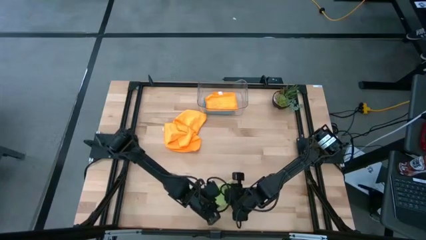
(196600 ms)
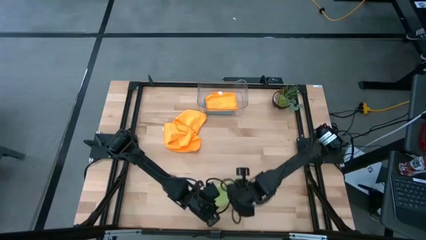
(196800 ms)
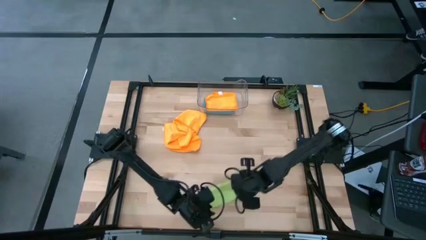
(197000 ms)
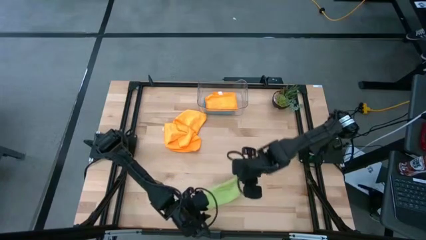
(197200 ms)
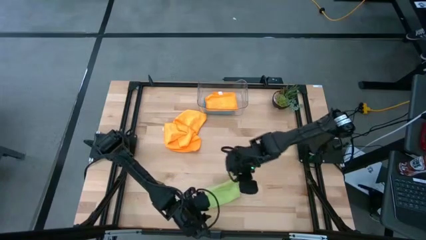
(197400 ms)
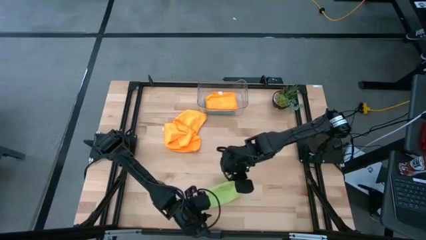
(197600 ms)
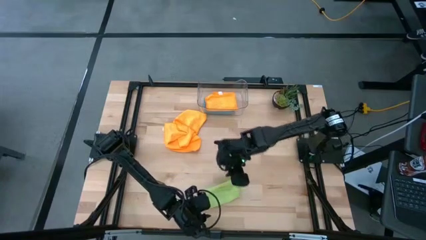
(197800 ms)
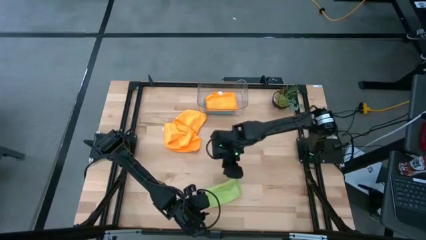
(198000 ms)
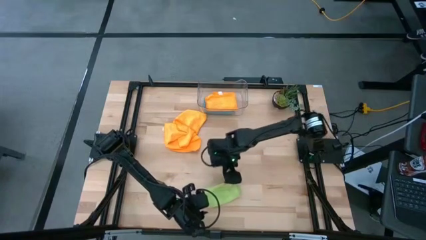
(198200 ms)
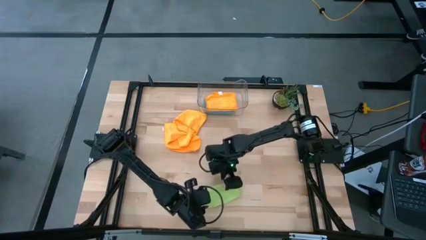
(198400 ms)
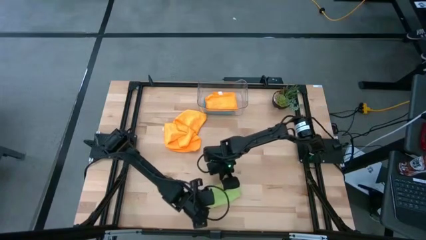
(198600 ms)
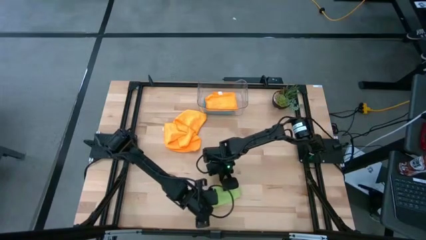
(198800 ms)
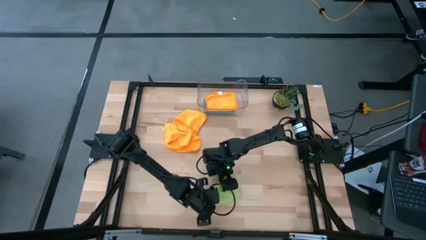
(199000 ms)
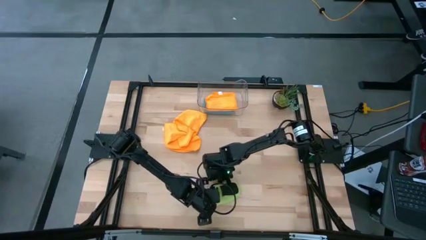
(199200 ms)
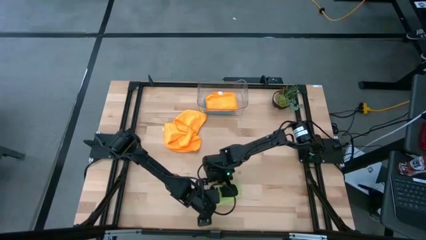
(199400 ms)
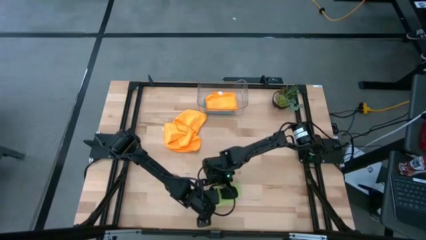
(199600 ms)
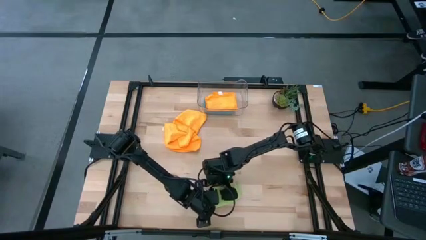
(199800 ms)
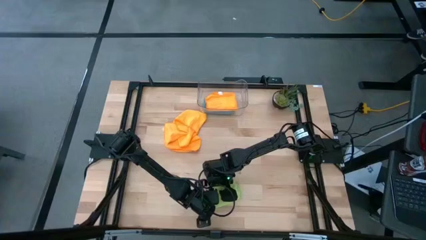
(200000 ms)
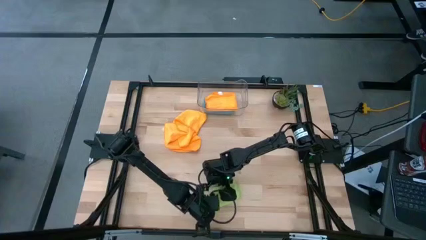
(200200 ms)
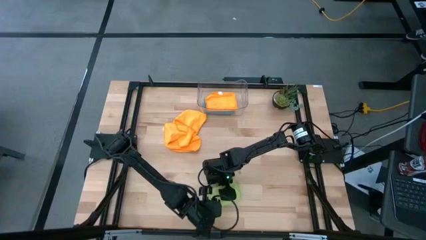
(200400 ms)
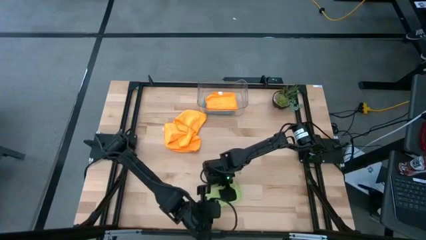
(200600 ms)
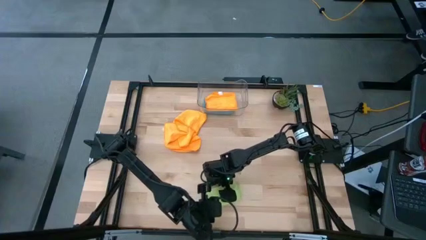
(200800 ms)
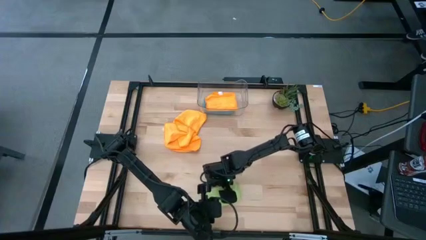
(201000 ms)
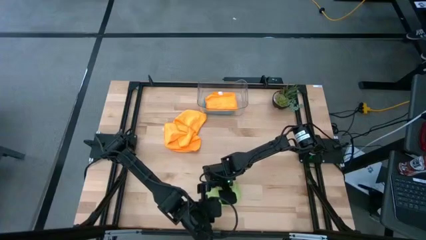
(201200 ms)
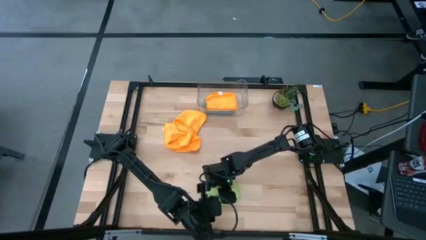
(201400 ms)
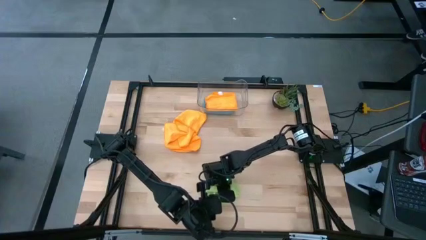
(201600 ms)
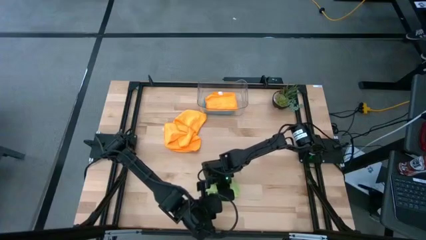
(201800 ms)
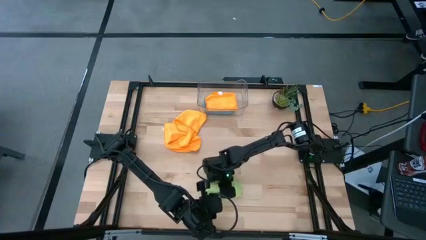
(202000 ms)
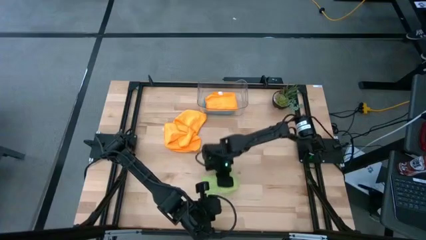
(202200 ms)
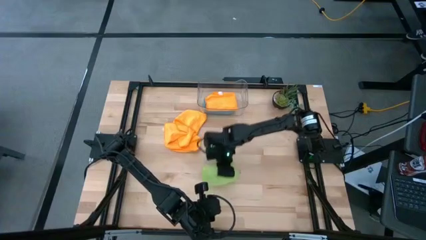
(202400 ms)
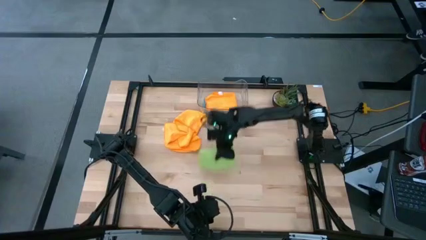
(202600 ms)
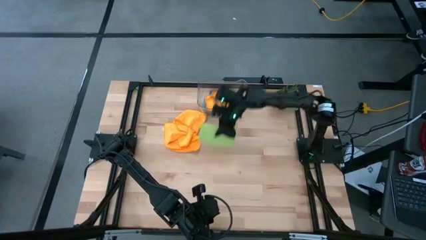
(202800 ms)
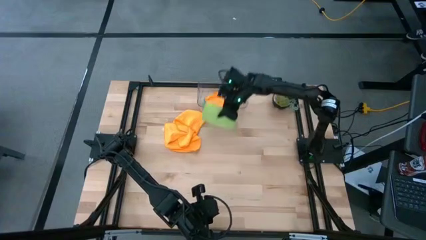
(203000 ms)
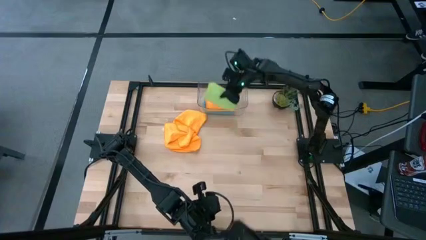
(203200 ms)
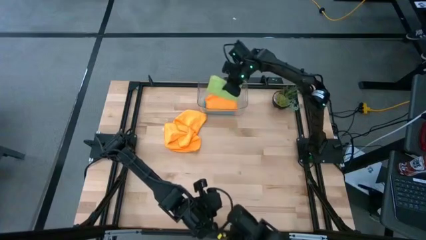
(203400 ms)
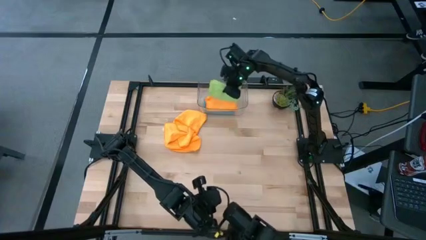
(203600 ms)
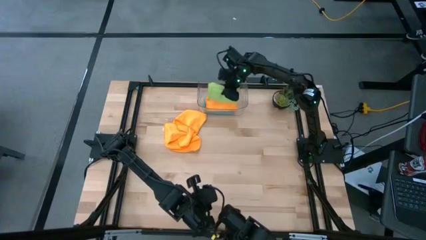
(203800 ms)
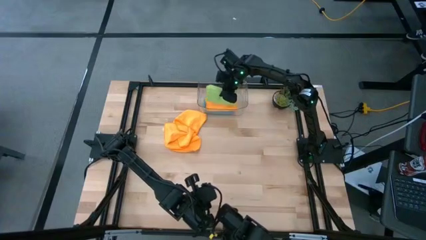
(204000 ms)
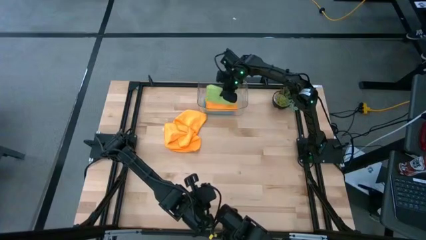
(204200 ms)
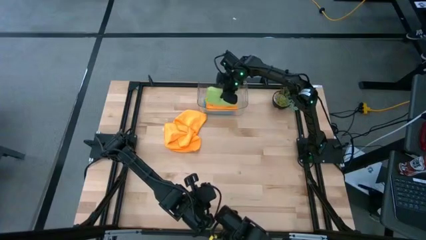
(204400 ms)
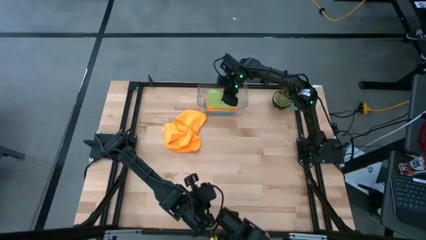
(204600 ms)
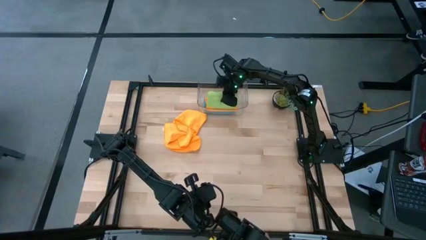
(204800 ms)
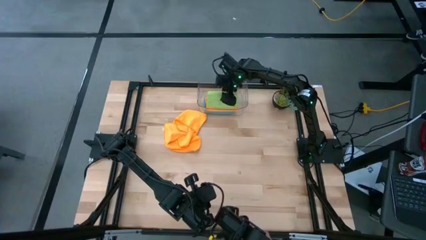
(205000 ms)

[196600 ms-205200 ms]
Task: Fold microfiber towels
Put the green microfiber cloth into the transparent bin

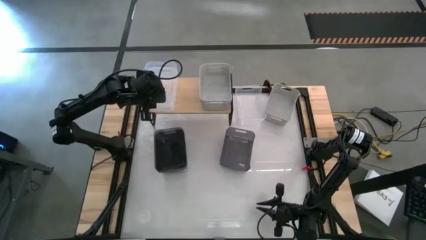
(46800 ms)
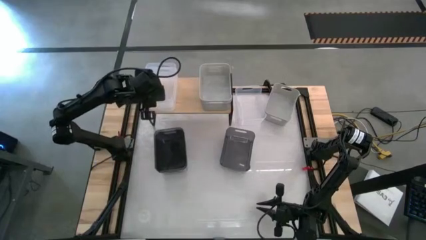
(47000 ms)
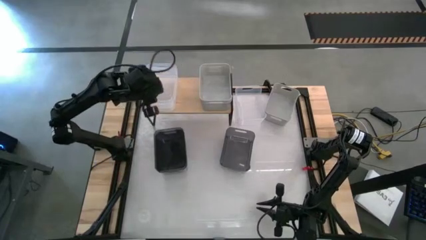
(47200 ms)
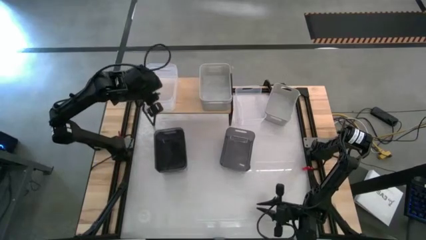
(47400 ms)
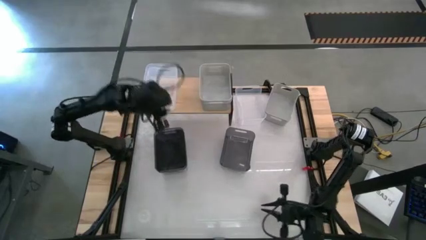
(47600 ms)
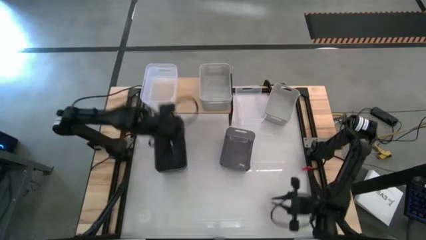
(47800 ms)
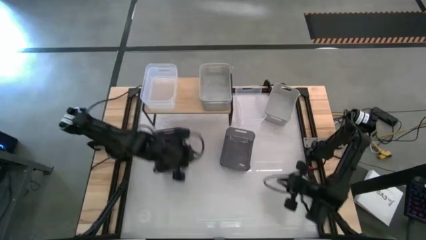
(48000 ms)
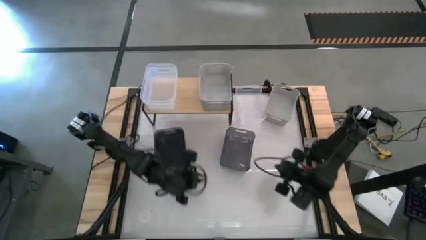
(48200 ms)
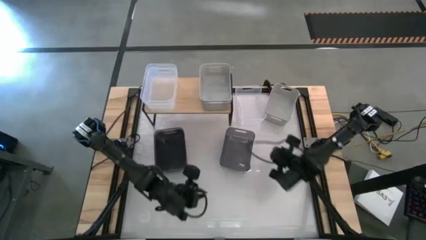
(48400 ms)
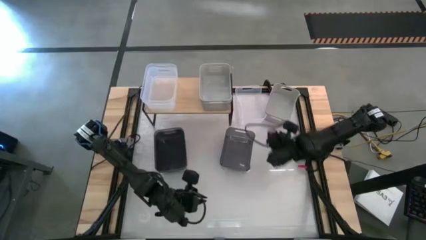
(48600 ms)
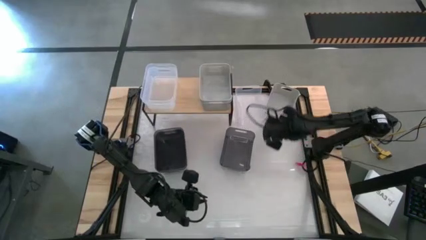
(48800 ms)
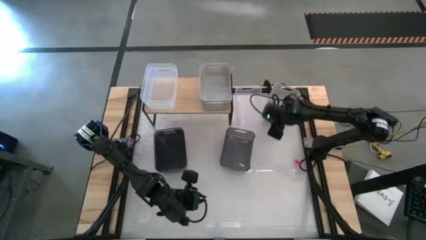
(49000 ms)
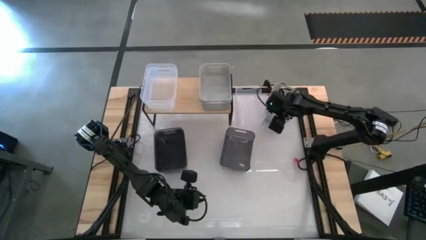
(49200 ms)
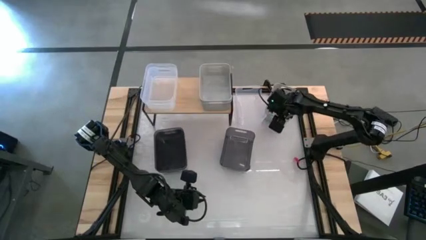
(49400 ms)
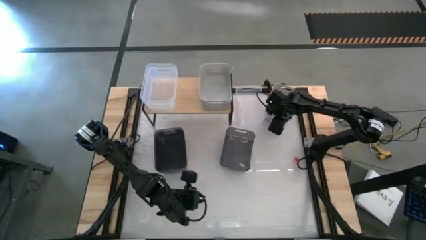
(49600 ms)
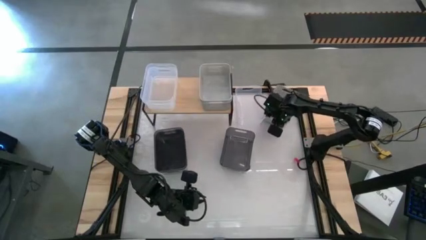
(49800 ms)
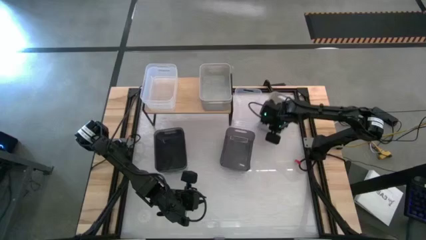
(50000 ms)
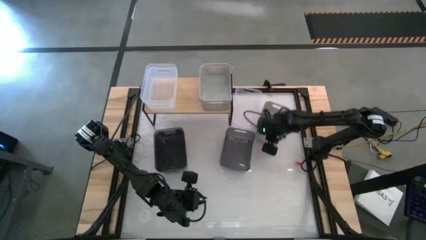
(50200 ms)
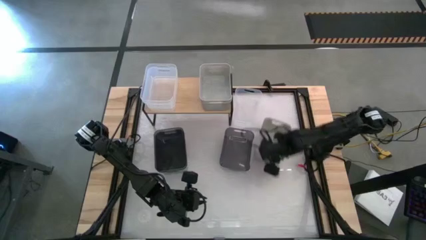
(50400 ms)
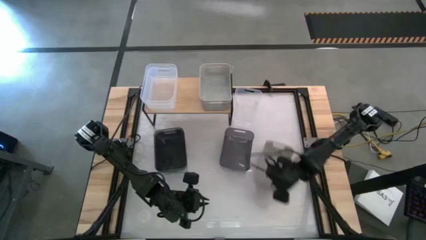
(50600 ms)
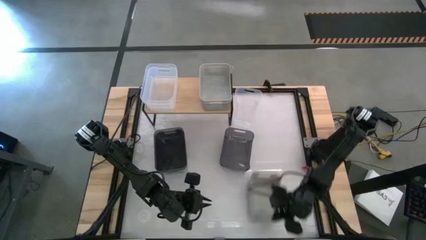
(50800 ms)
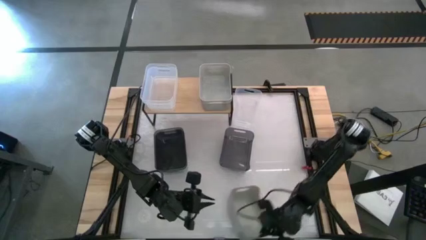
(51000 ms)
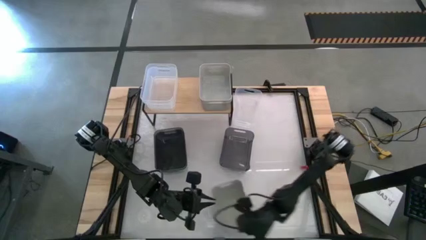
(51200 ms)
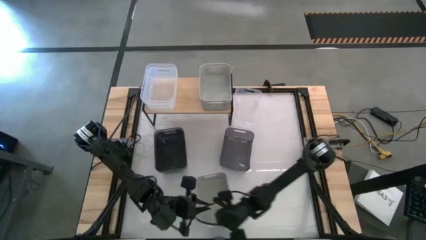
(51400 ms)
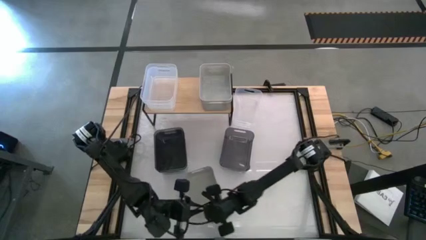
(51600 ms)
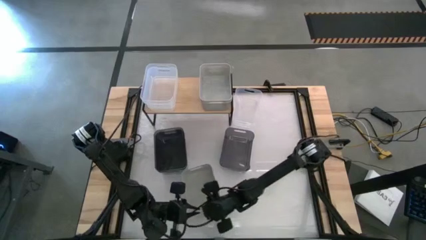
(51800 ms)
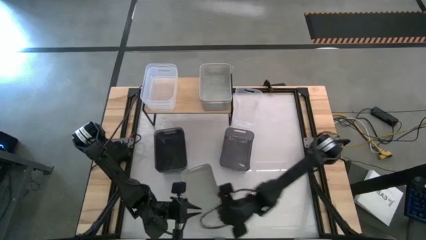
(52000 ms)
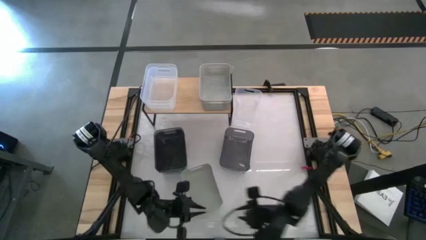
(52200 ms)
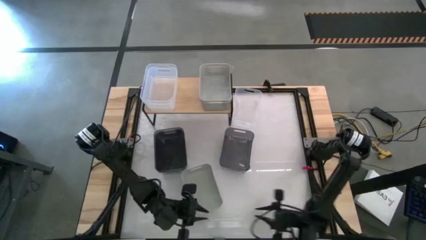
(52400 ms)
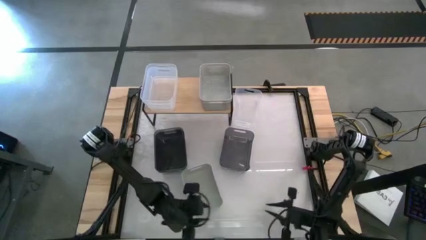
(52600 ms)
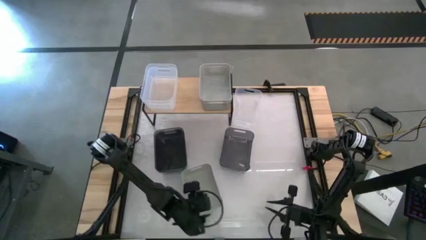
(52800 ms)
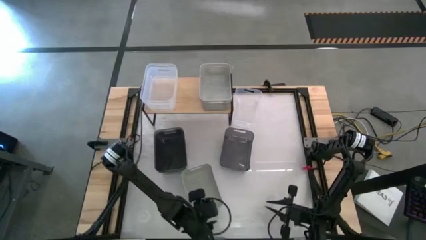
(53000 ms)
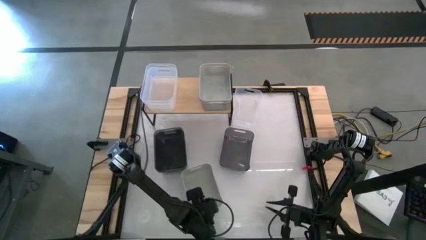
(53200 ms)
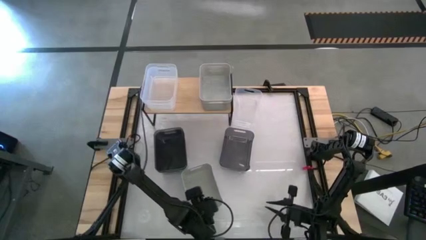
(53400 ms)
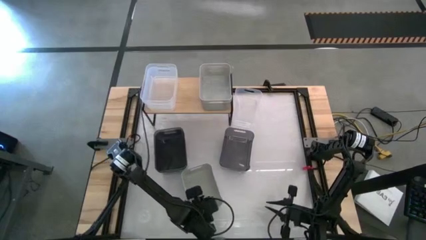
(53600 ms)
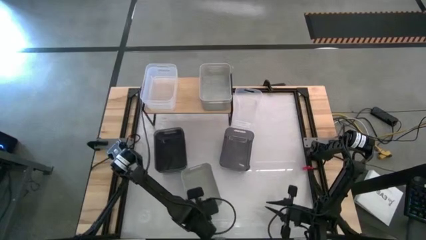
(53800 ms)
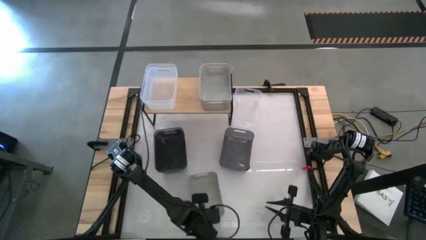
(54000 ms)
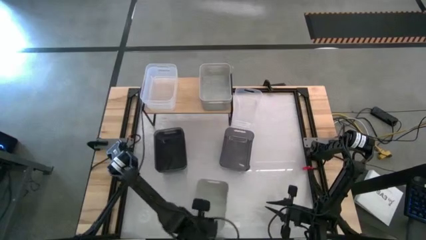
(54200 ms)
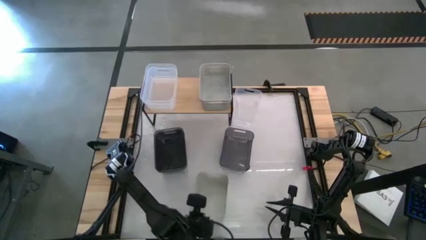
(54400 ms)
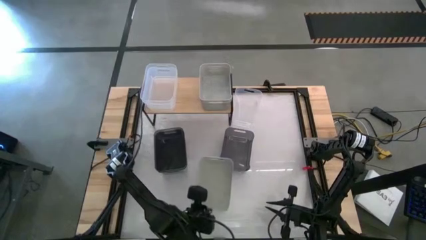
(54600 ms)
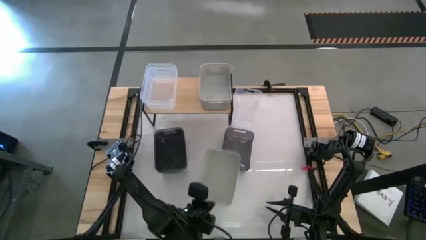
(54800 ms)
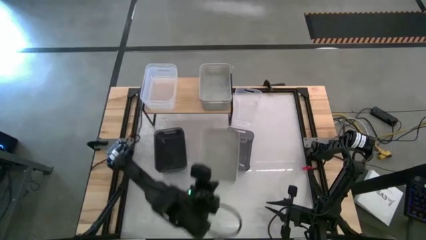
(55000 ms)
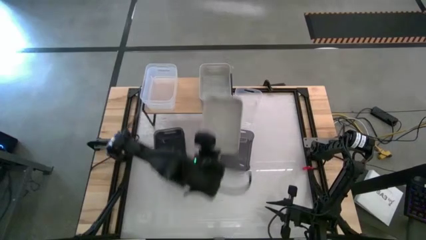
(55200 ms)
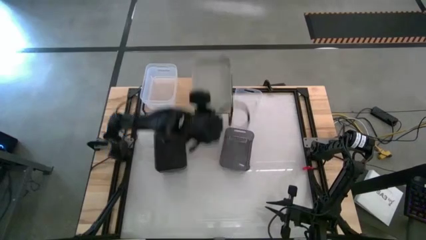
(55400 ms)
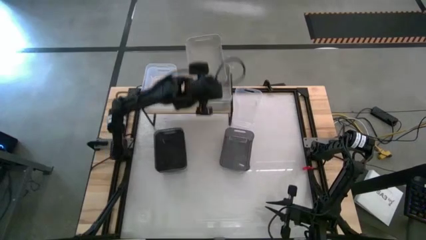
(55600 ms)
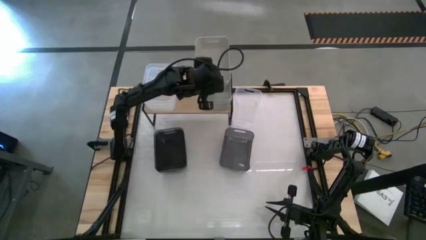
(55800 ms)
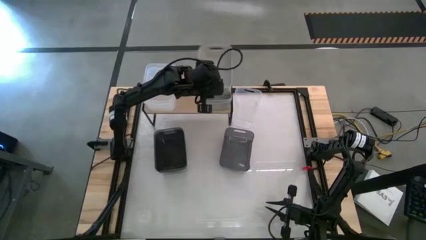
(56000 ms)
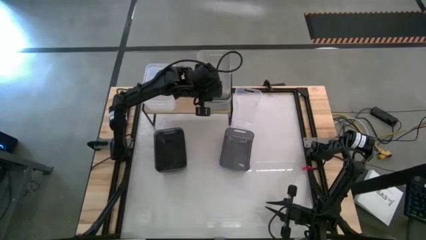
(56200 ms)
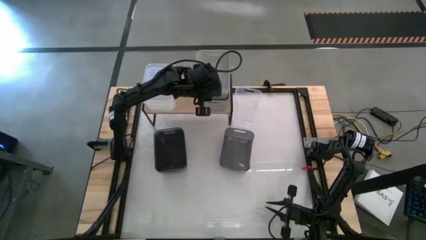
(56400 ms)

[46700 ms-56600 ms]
Task: Stack baskets on shelf by color
Stack the gray bin on top of the gray bin on the shelf
